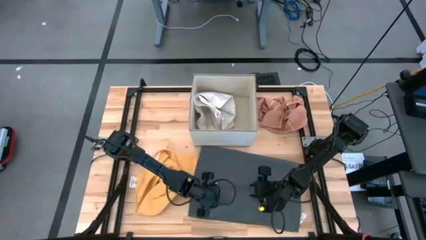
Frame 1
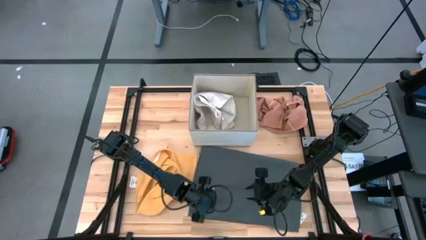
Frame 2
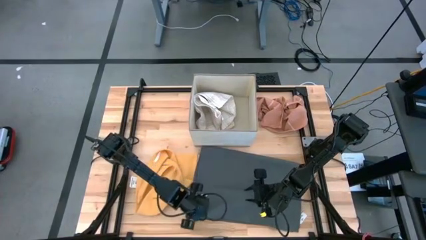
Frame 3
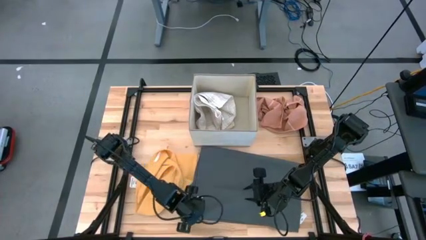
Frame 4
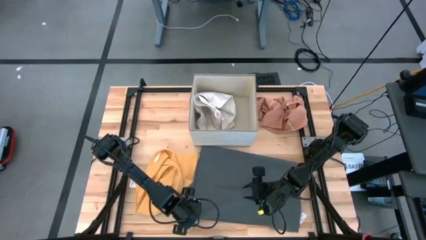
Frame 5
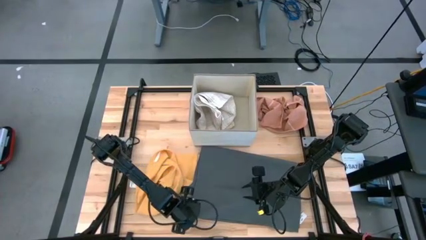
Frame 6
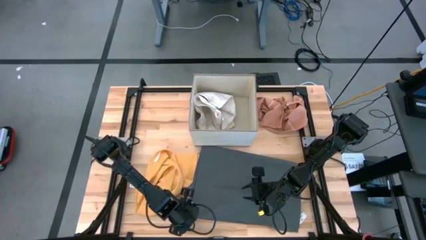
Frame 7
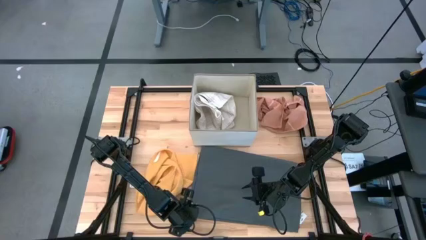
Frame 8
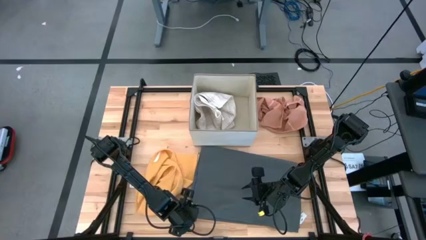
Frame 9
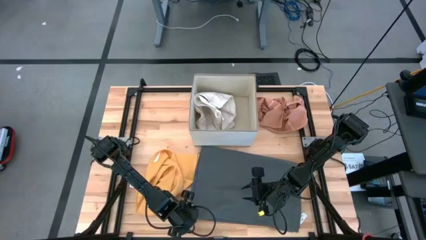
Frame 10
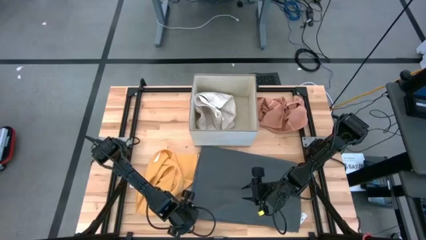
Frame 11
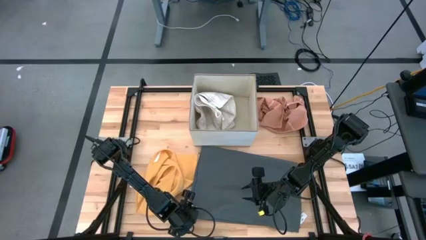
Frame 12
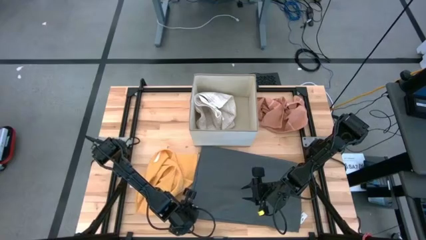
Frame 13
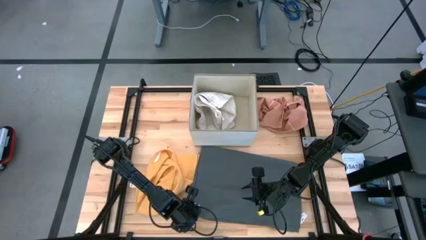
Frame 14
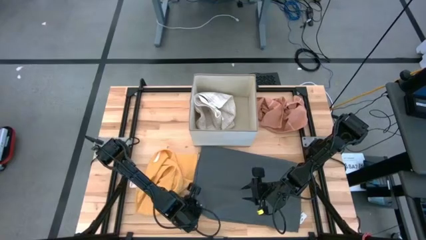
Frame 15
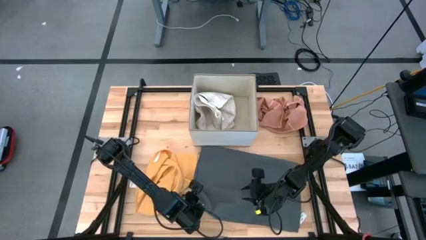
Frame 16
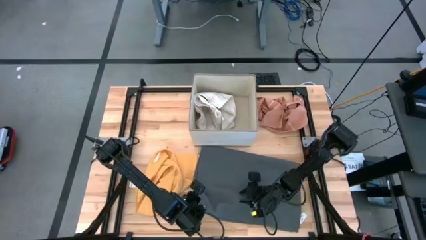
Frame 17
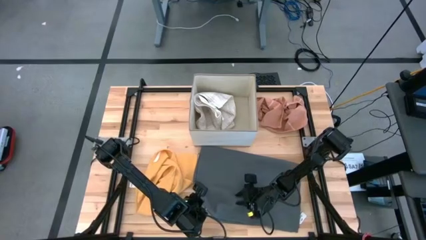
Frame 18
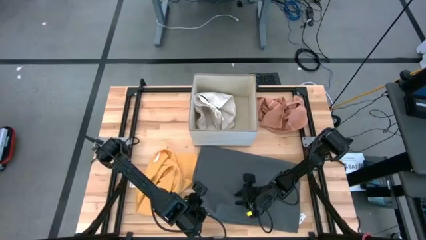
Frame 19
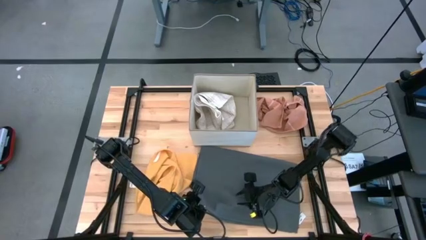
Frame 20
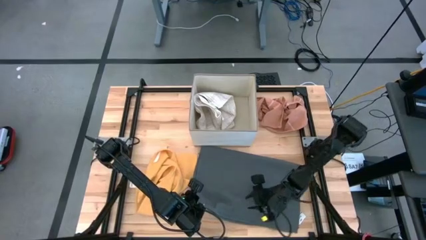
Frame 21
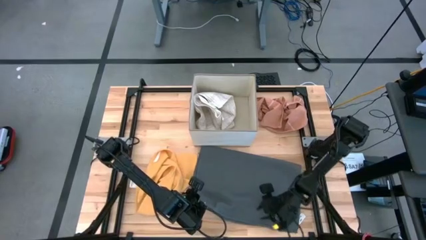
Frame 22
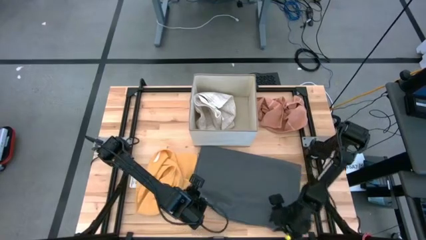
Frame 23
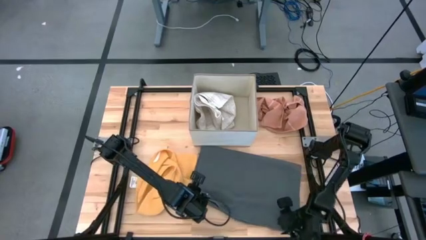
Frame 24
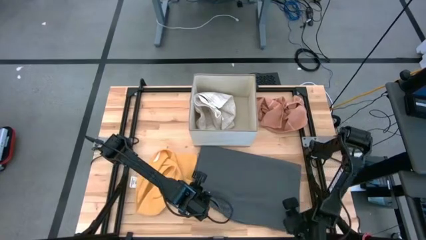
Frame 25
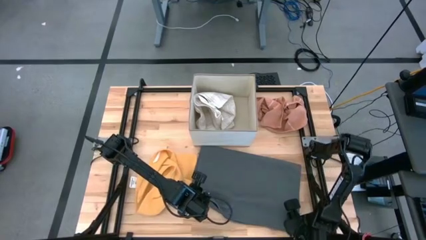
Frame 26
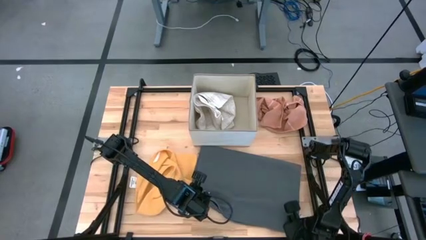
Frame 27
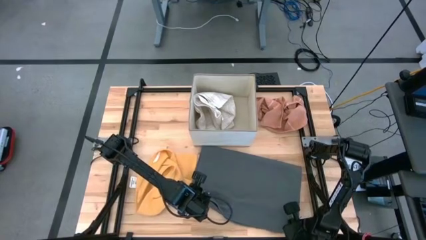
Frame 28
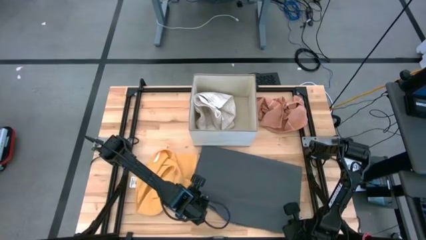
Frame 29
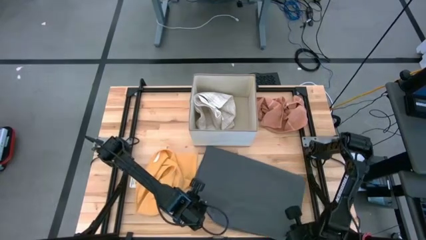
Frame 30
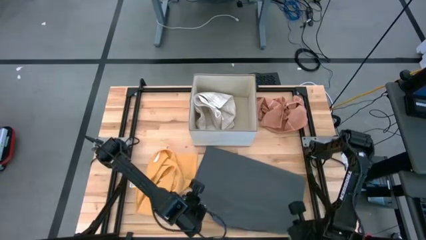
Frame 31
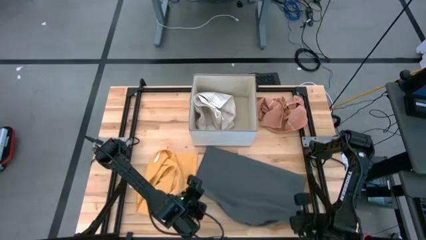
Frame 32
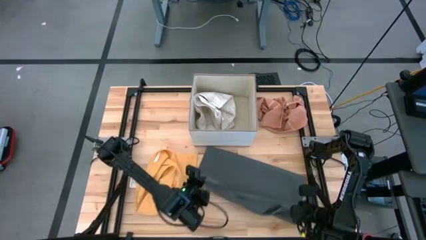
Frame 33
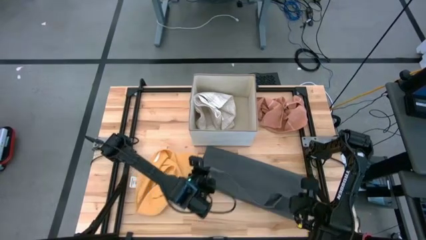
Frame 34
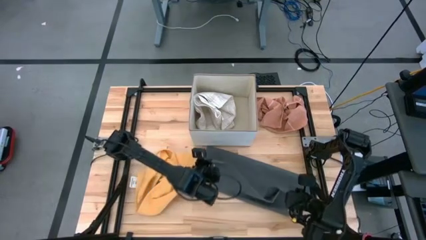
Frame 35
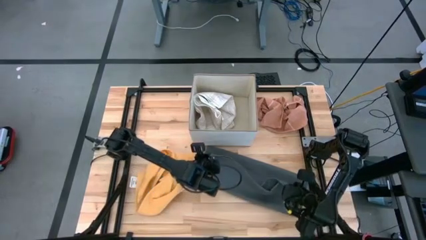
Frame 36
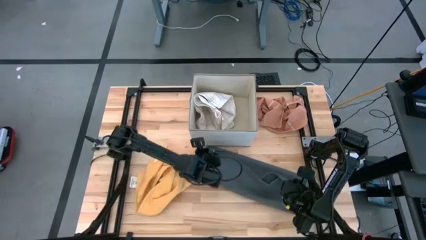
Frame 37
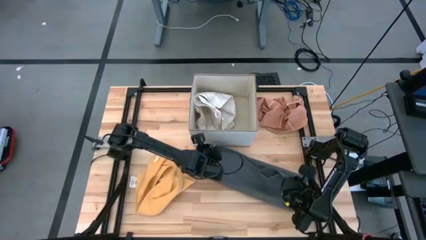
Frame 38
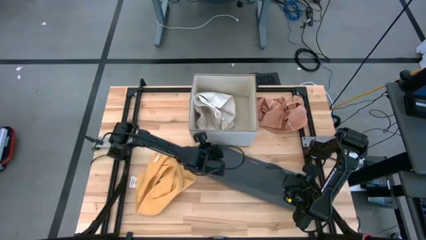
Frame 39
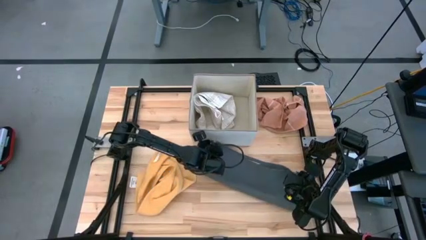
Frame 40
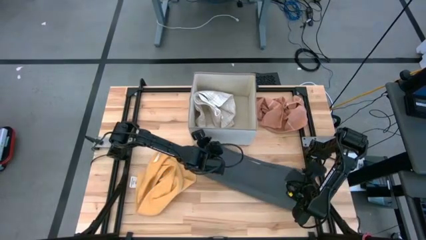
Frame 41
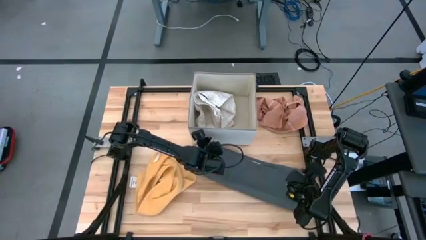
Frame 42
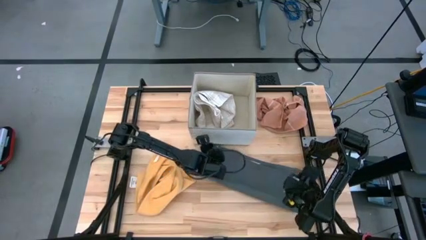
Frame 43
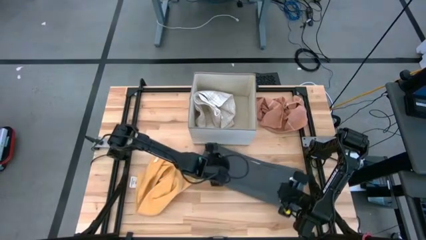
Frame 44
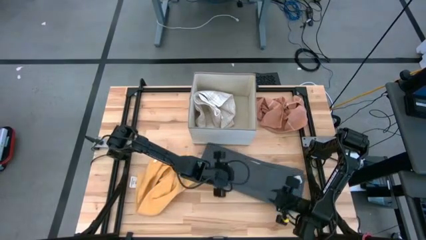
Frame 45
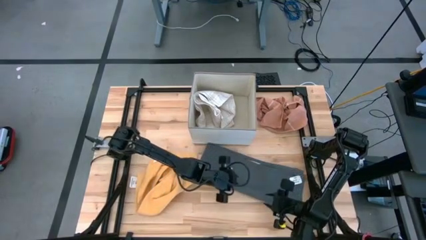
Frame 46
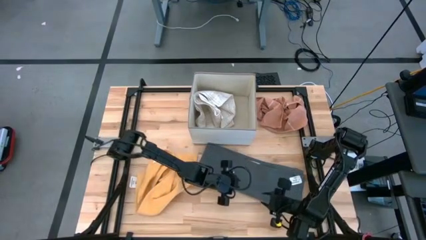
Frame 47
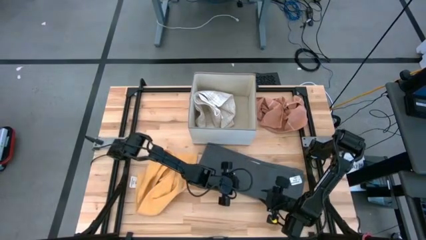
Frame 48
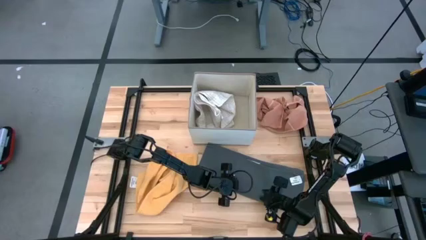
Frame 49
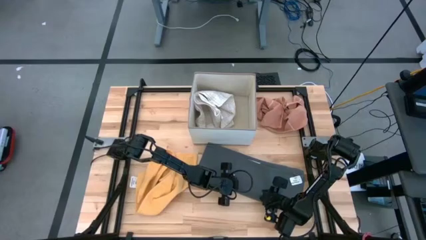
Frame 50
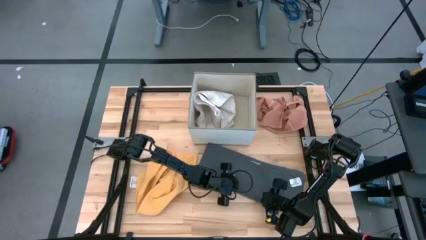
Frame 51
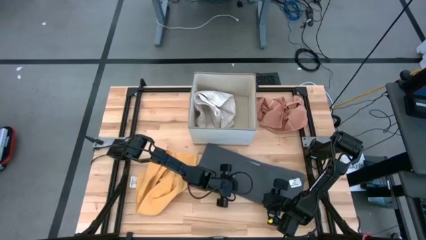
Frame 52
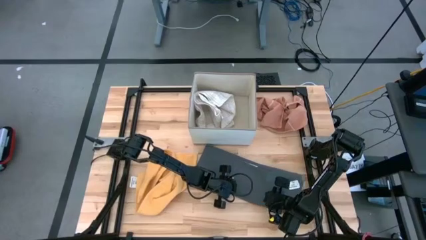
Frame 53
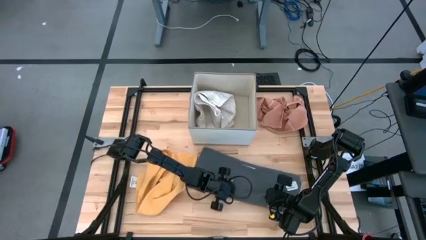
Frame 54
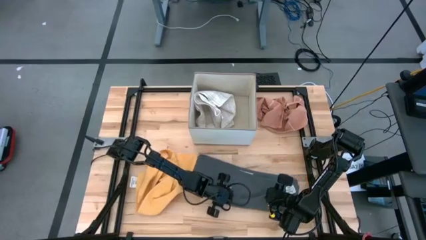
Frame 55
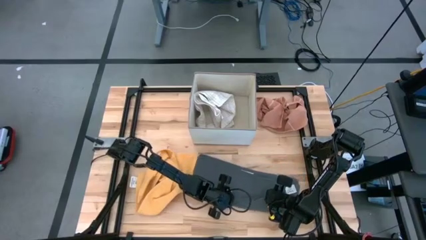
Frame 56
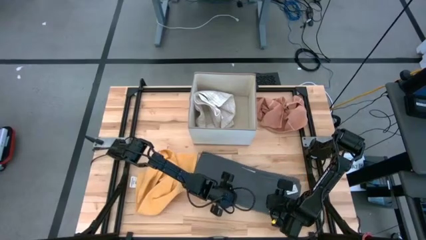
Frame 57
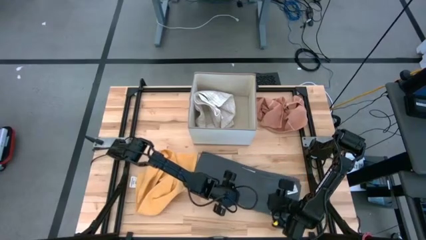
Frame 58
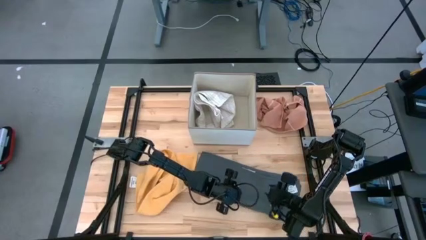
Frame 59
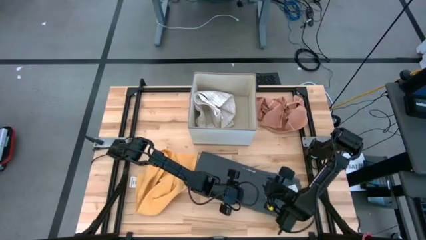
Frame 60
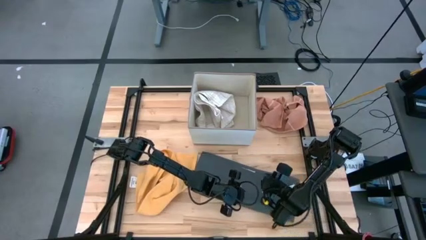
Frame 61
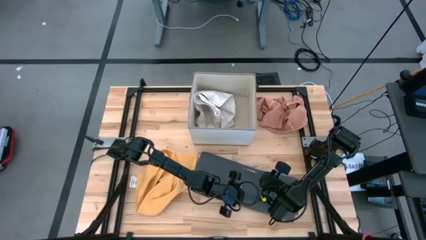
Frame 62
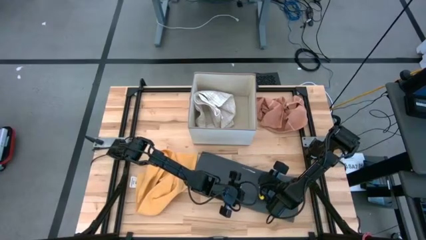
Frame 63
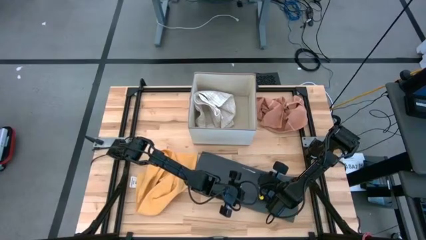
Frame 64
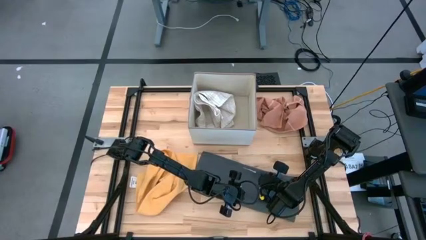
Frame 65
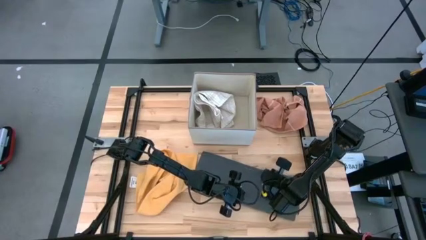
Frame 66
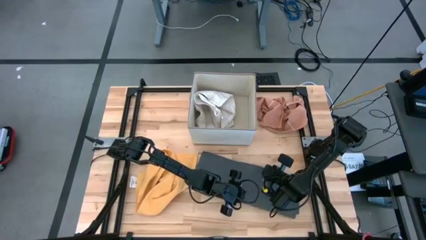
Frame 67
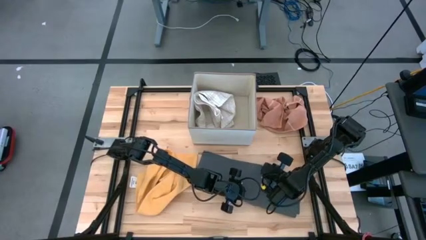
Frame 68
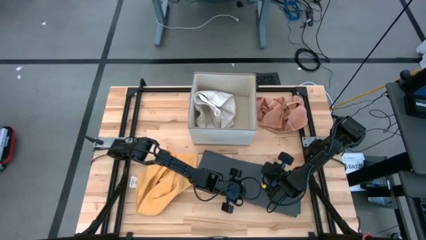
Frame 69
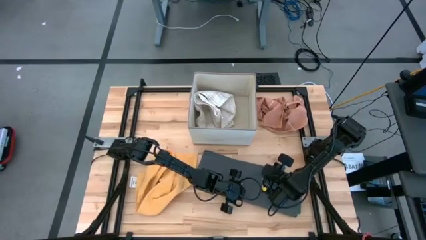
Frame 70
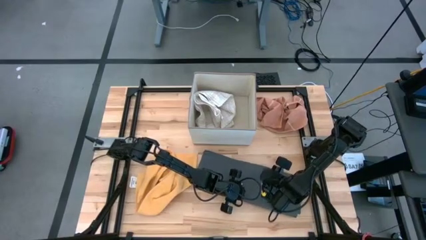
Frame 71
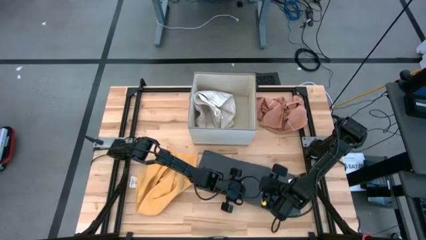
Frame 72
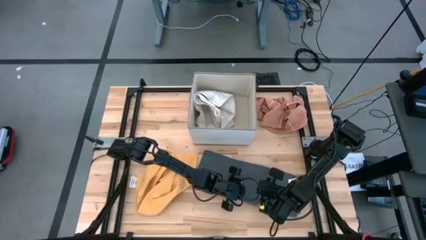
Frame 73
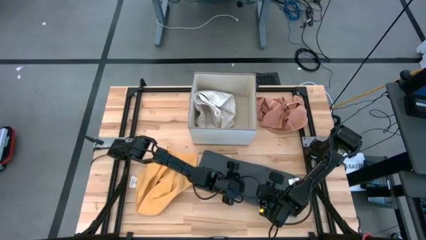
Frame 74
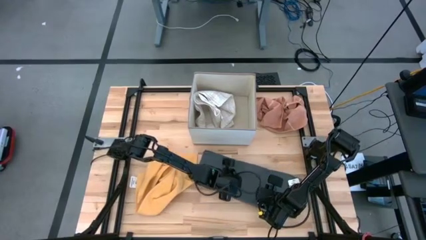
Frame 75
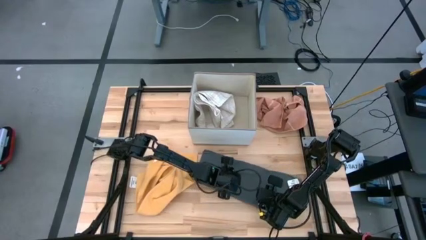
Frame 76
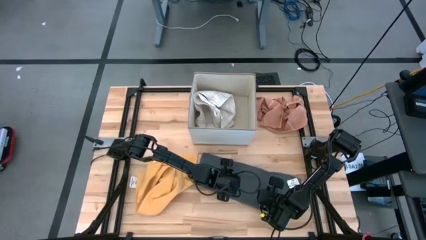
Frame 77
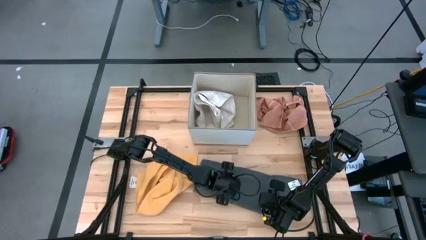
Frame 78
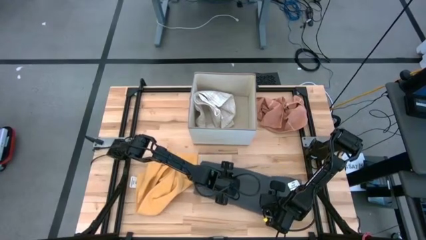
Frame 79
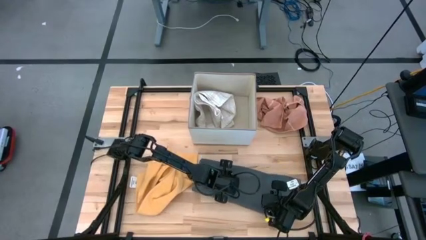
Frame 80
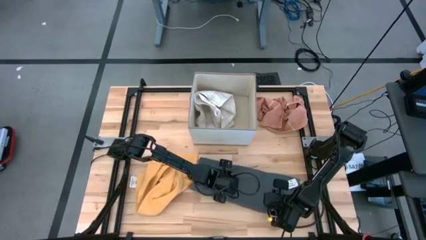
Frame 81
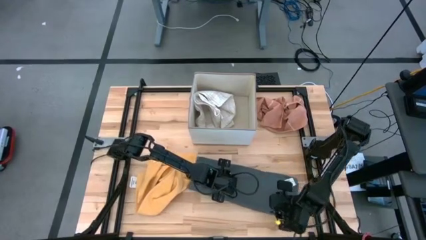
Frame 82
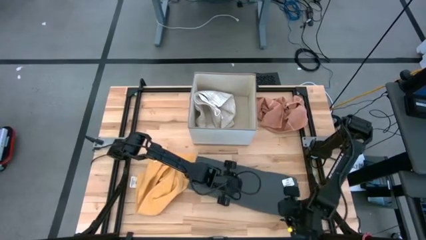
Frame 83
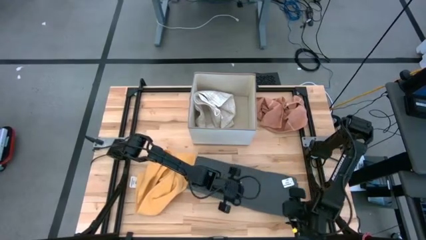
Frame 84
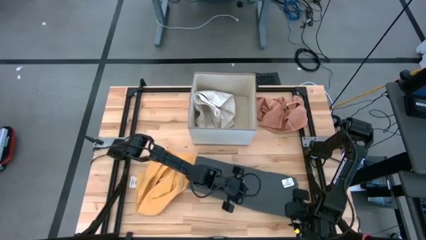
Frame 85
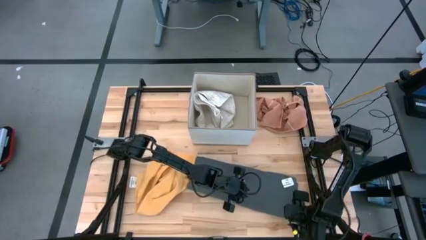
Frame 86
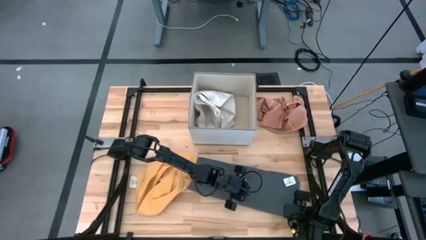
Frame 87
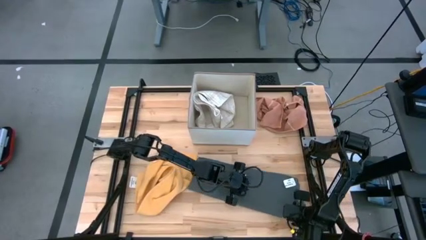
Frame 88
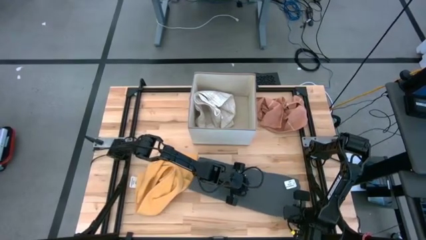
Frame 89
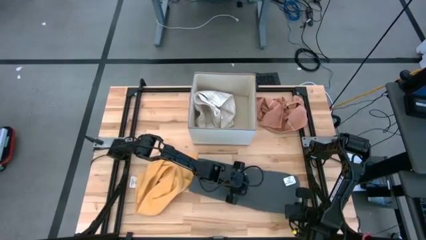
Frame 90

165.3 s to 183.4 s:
Task: Fold towel
Fold the gray towel
